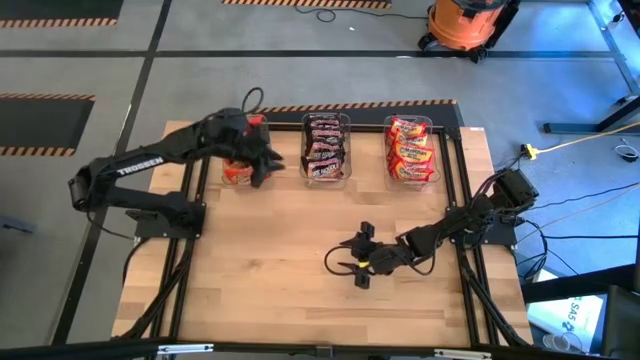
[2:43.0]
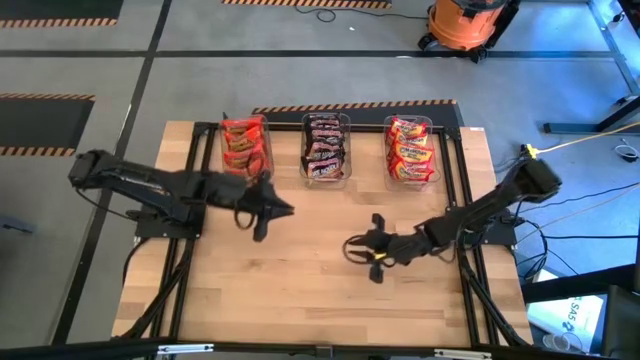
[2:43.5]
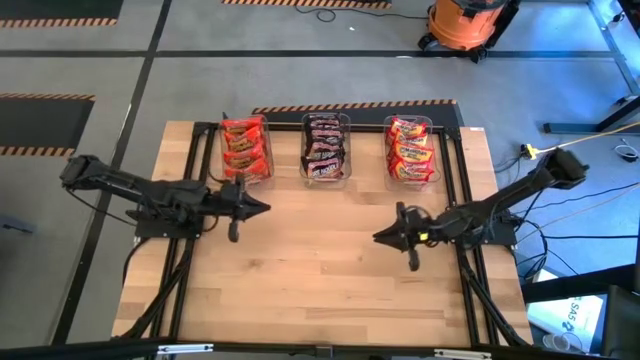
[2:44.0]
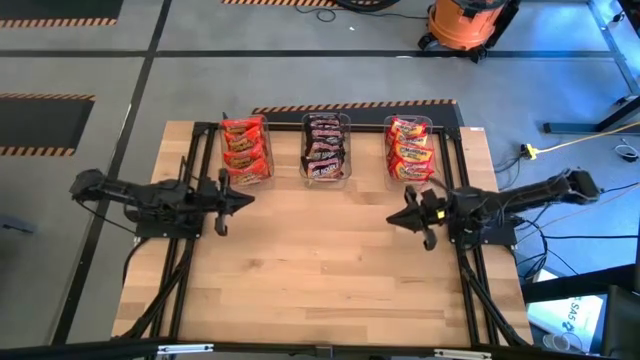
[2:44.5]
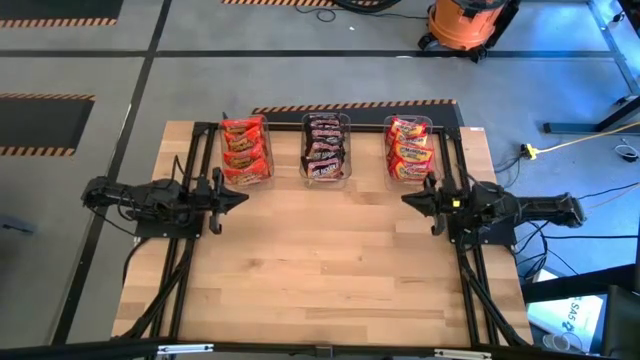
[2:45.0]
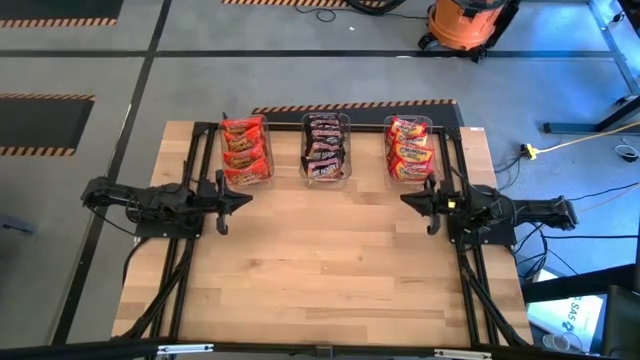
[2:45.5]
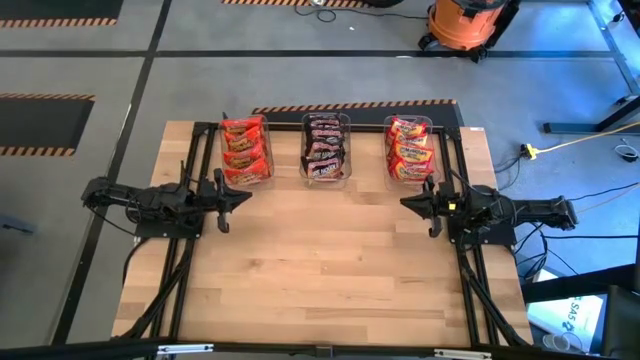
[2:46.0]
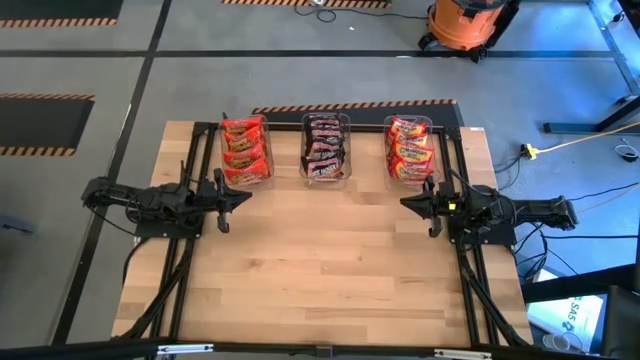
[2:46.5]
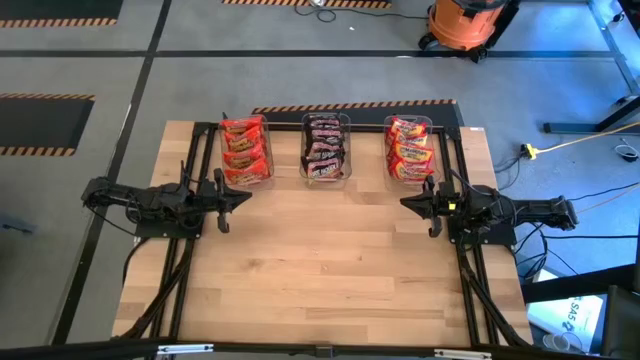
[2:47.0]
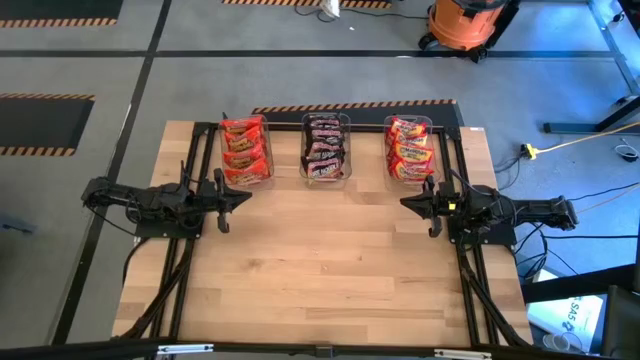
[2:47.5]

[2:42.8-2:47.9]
Task: Sort Maruchan noodles
Return to Home Position

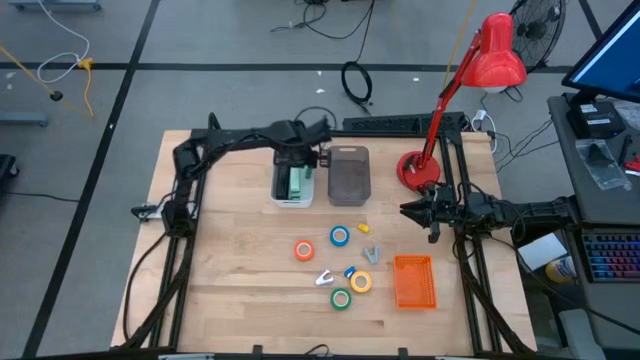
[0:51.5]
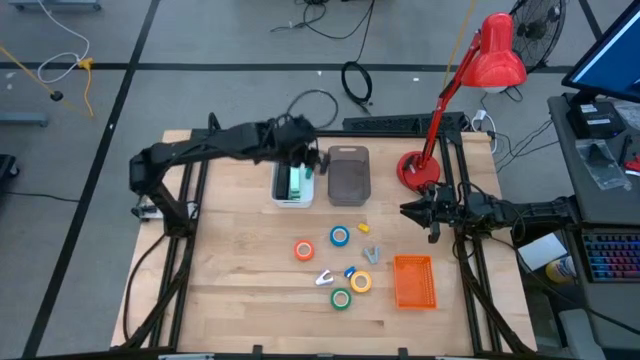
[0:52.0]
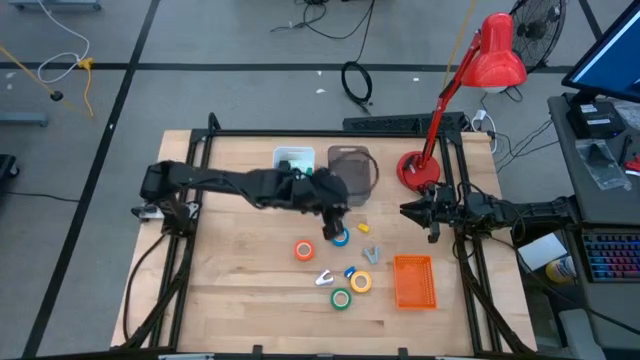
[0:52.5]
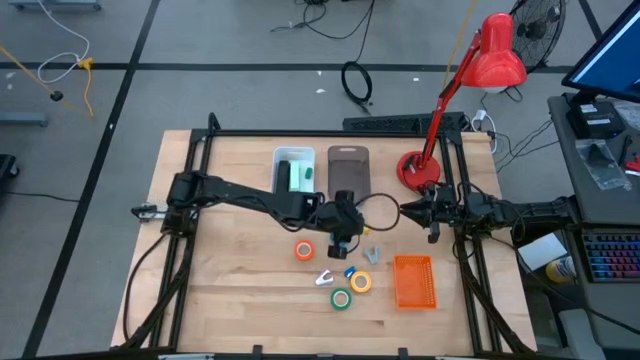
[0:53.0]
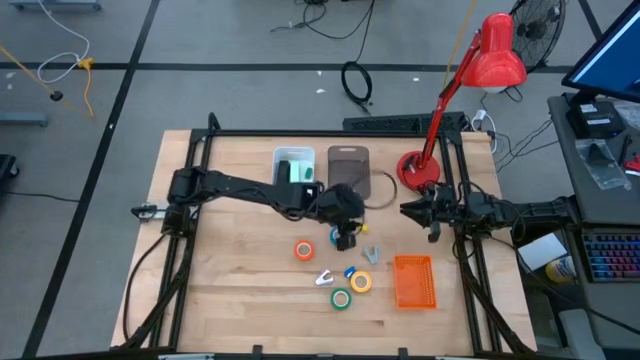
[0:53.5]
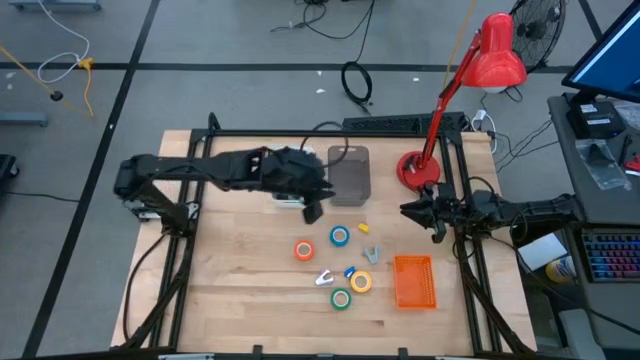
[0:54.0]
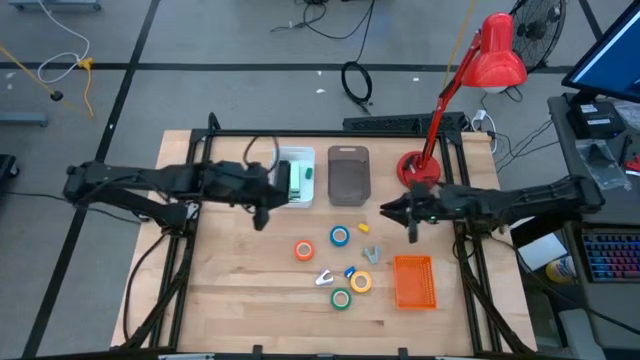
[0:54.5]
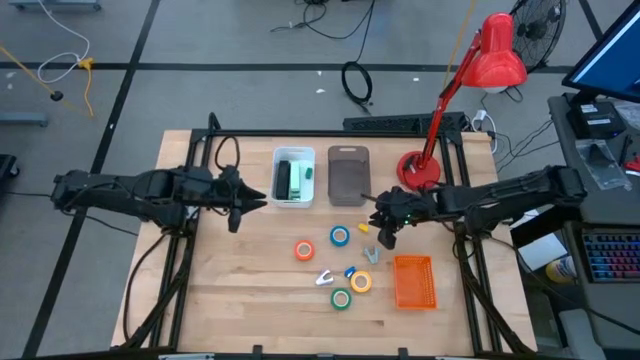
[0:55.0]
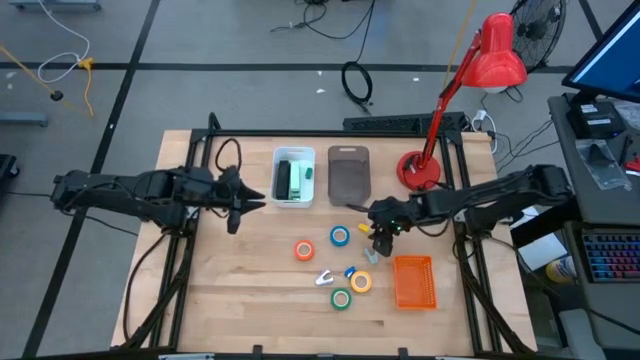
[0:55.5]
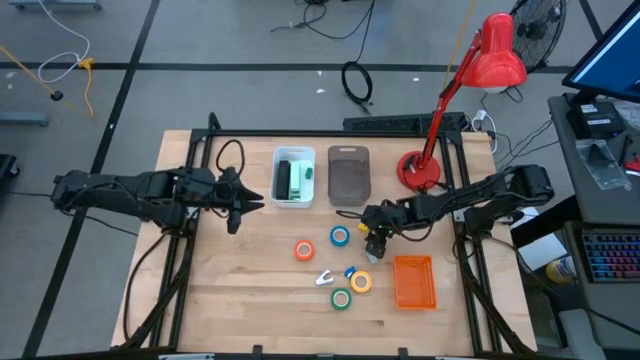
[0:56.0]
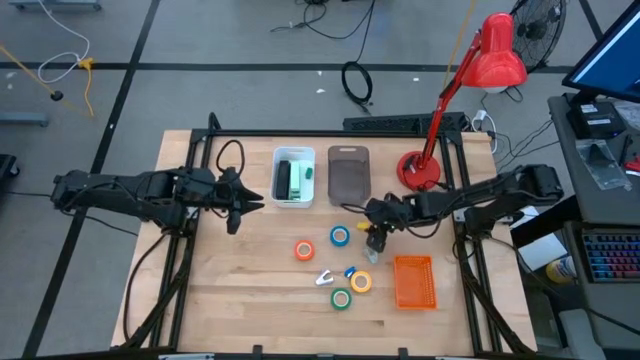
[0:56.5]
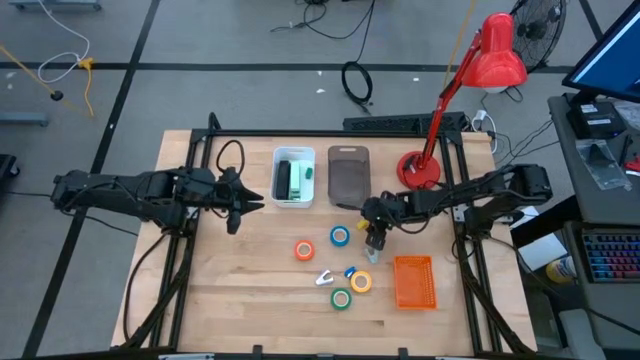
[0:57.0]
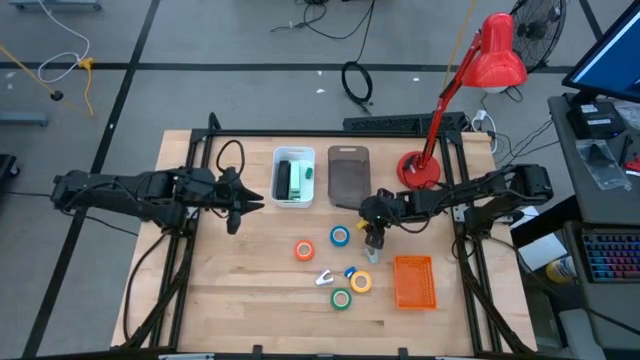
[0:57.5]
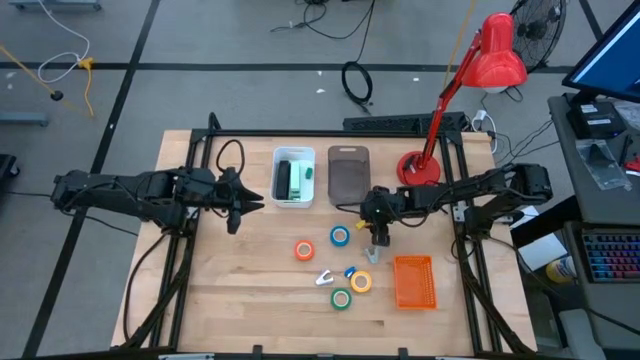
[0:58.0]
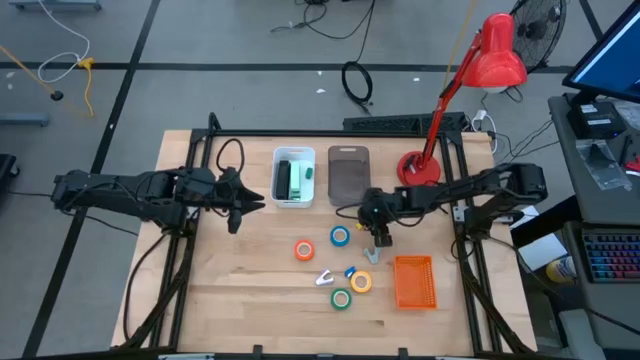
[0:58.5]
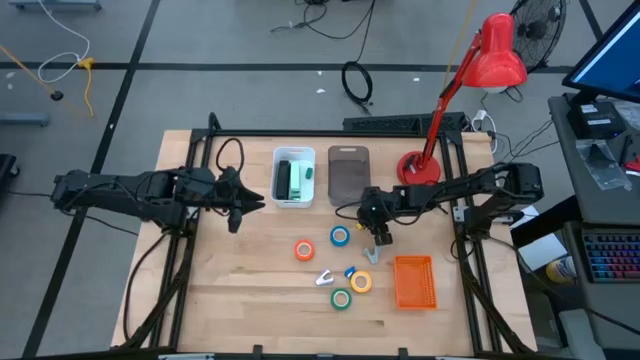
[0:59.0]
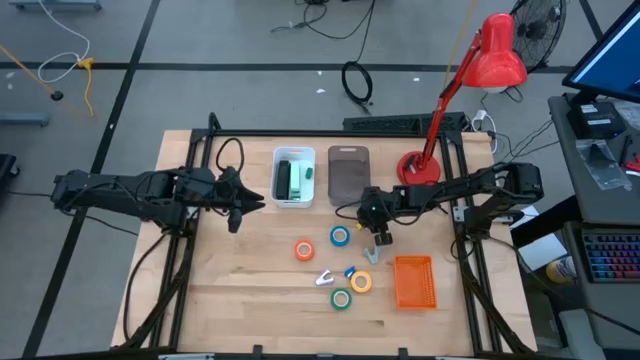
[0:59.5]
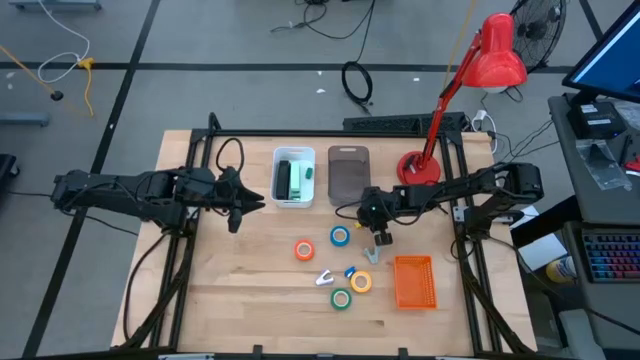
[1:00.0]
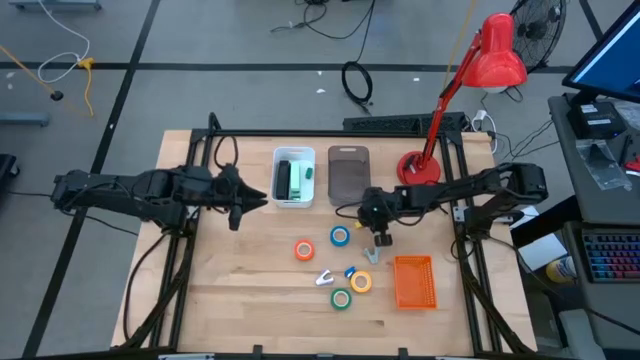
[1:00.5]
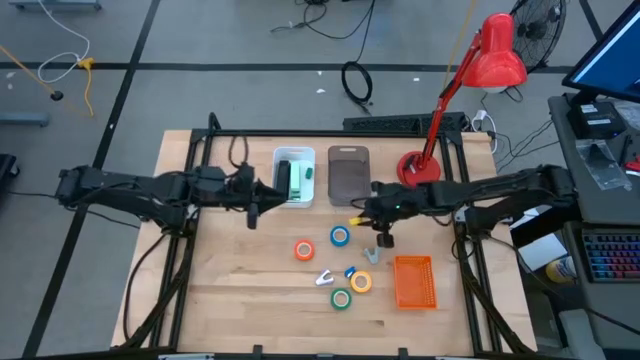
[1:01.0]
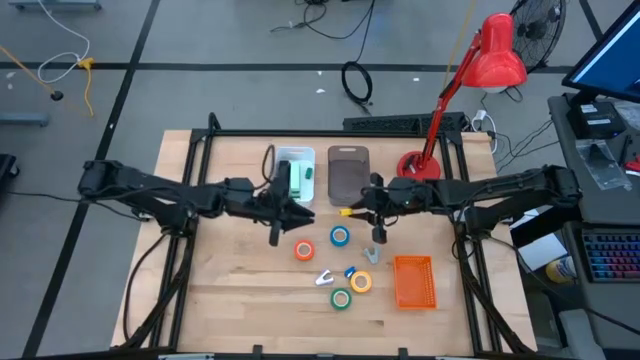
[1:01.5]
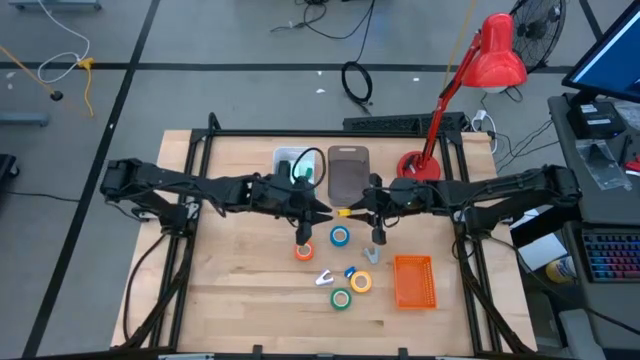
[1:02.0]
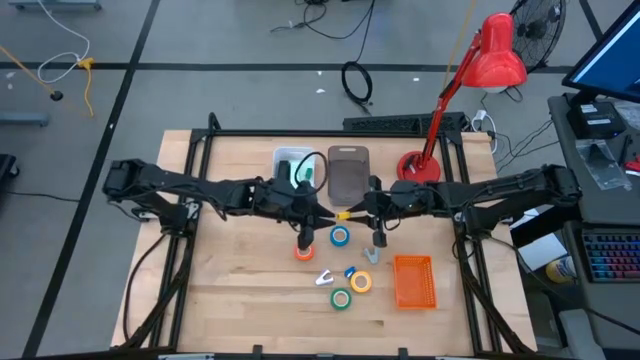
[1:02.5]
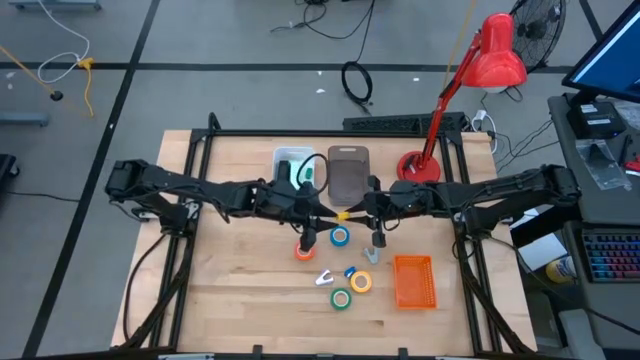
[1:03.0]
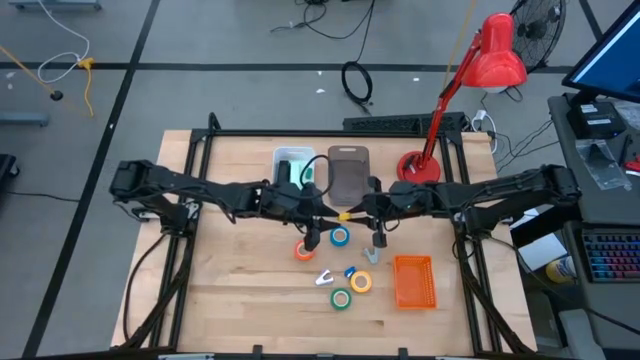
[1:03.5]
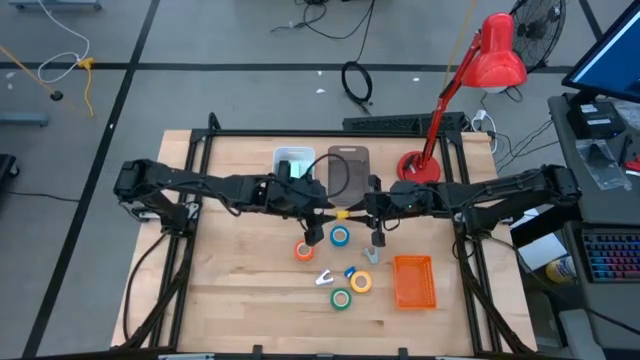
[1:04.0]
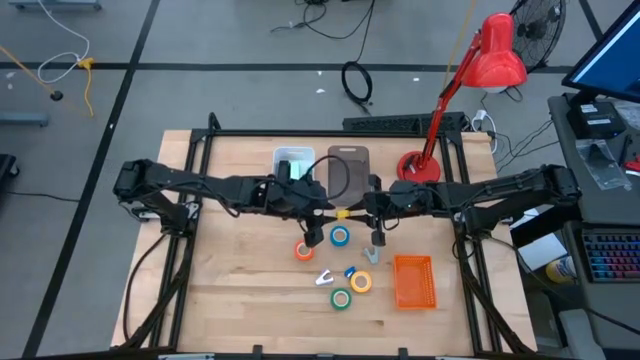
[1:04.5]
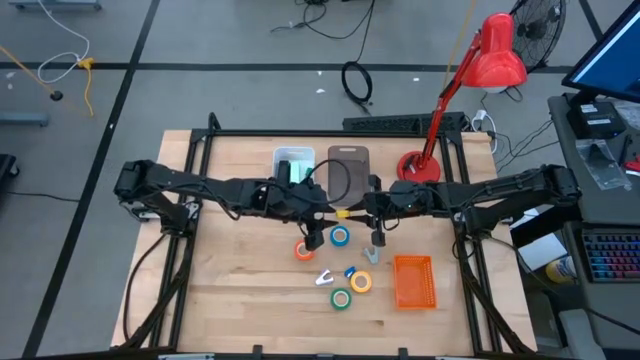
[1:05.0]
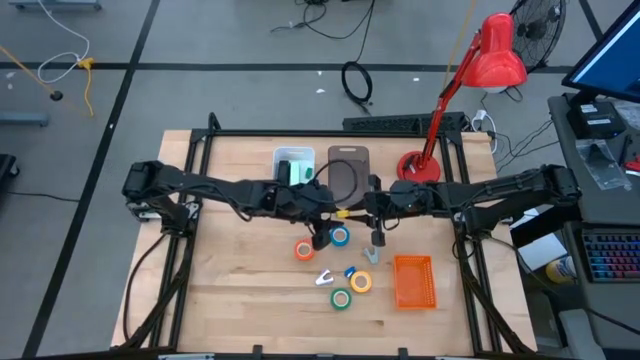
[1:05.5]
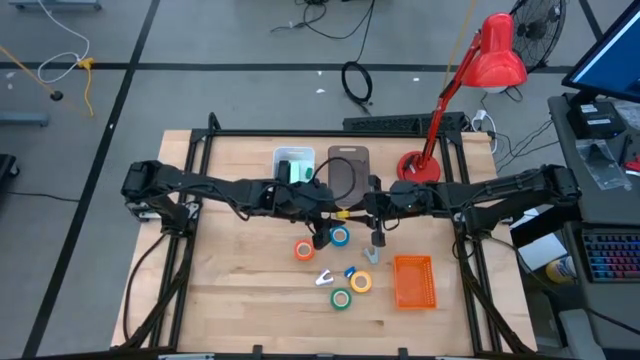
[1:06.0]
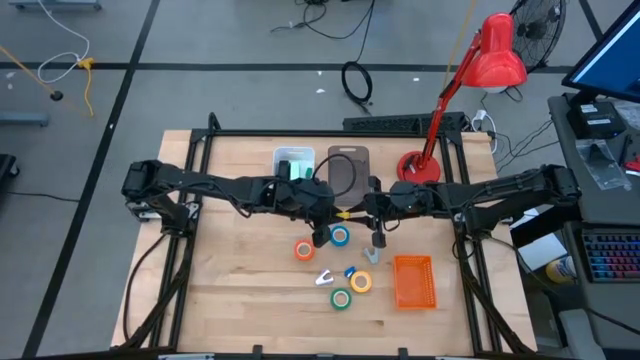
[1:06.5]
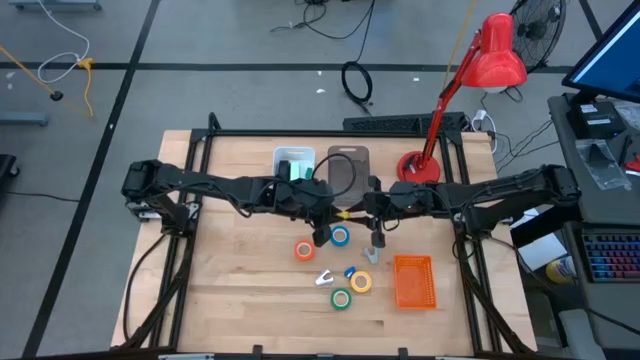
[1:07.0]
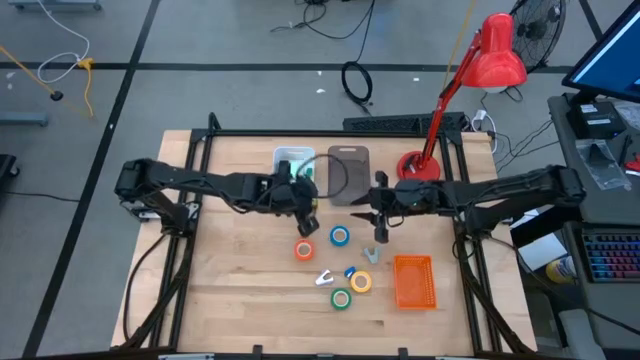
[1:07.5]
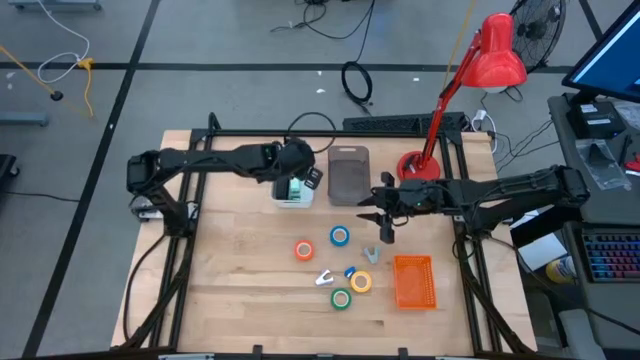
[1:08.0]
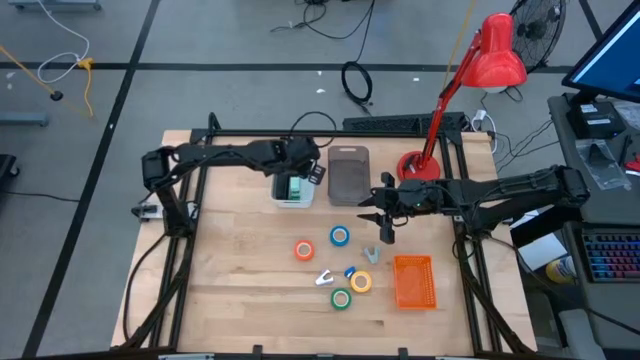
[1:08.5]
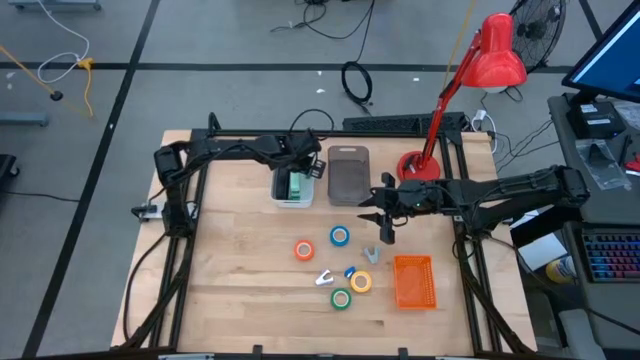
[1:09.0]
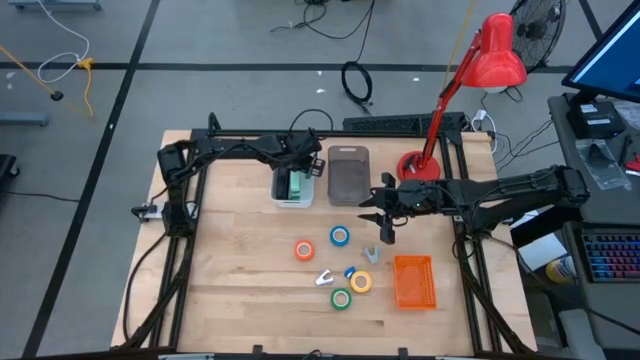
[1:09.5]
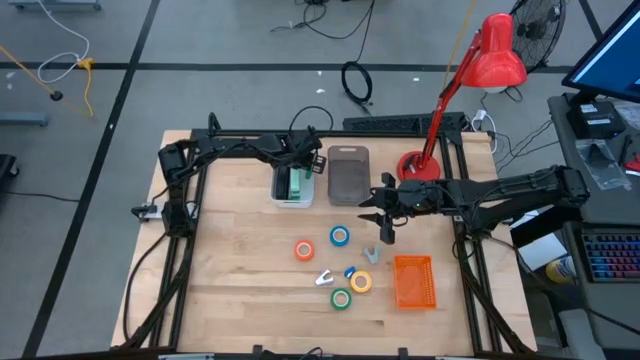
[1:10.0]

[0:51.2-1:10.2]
Task: Pick and place Stapler, Stapler remover, tape
Put the yellow stapler into the white bin
